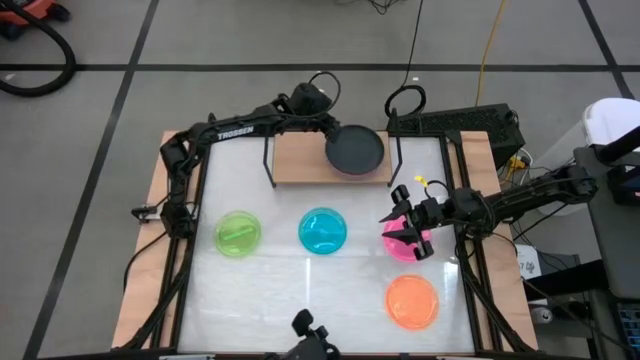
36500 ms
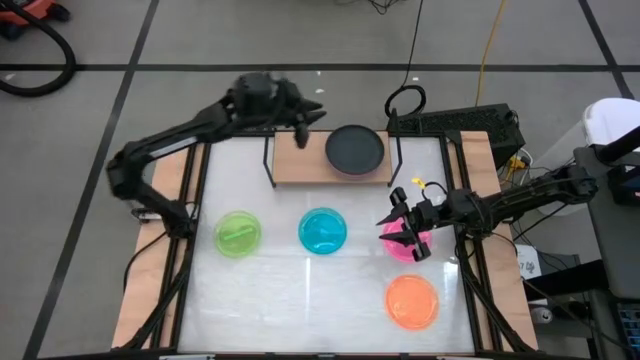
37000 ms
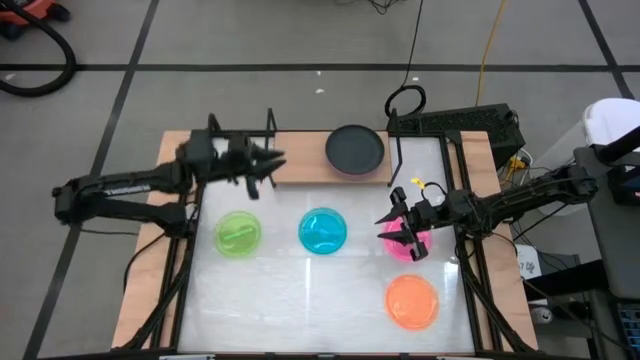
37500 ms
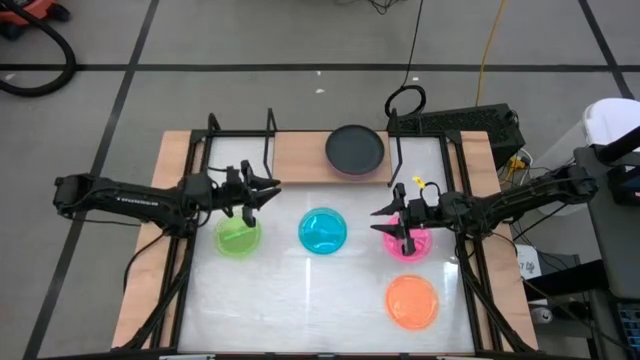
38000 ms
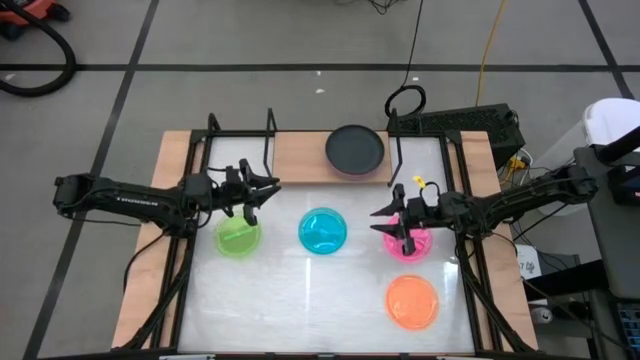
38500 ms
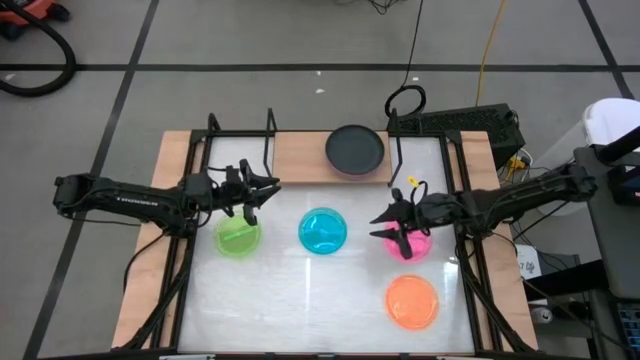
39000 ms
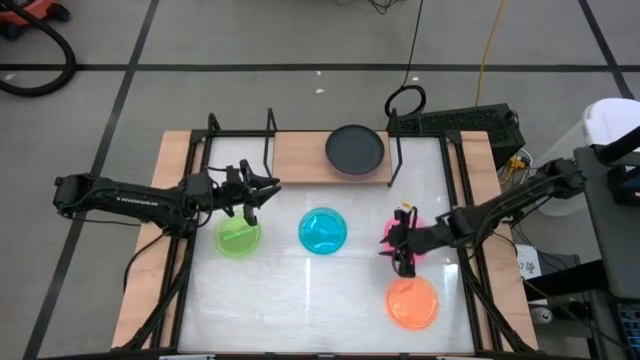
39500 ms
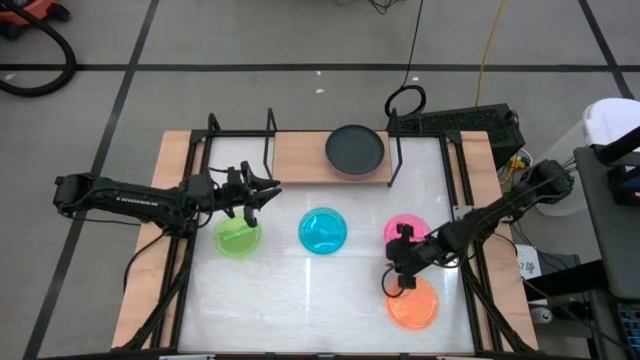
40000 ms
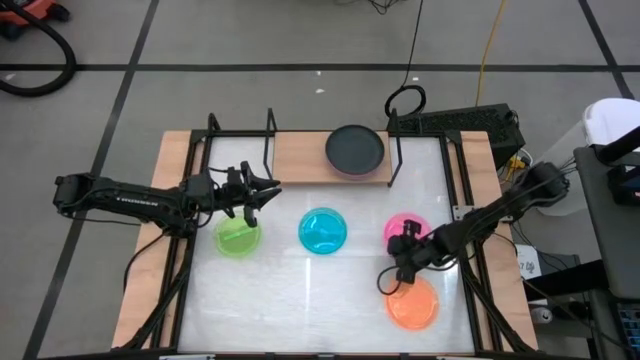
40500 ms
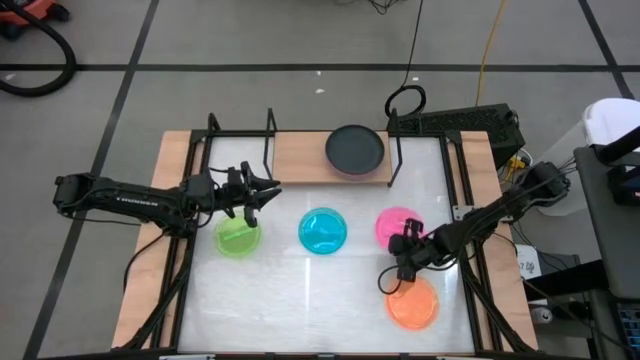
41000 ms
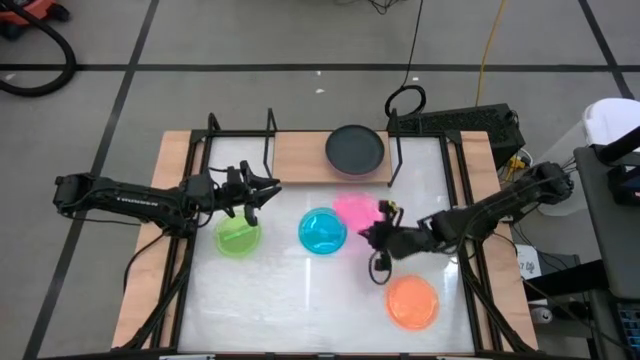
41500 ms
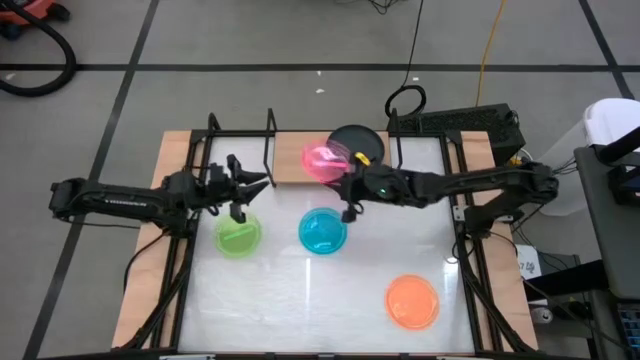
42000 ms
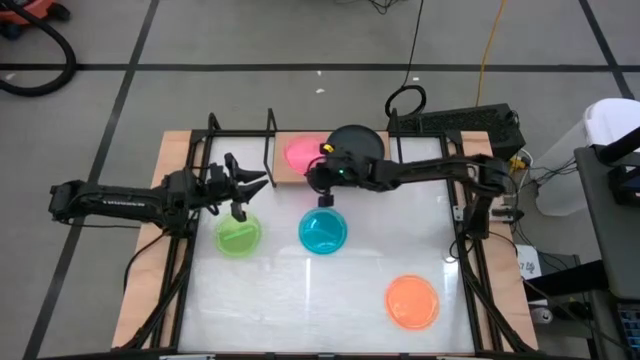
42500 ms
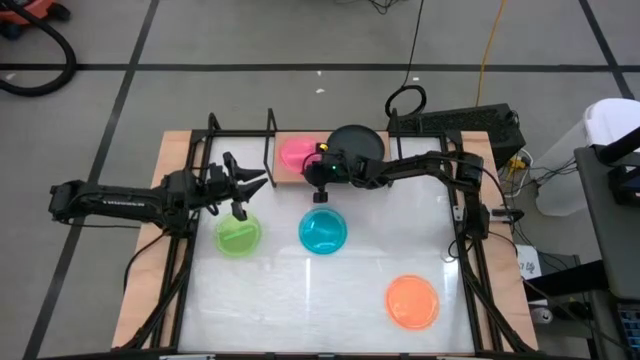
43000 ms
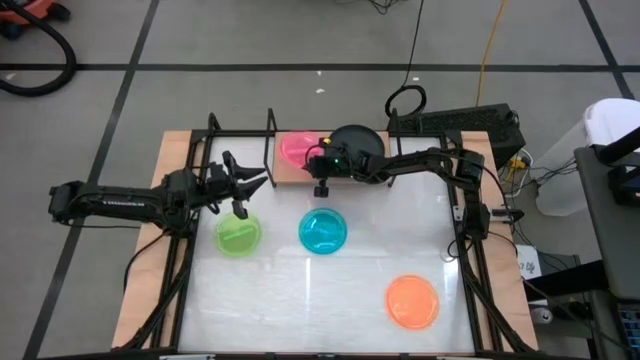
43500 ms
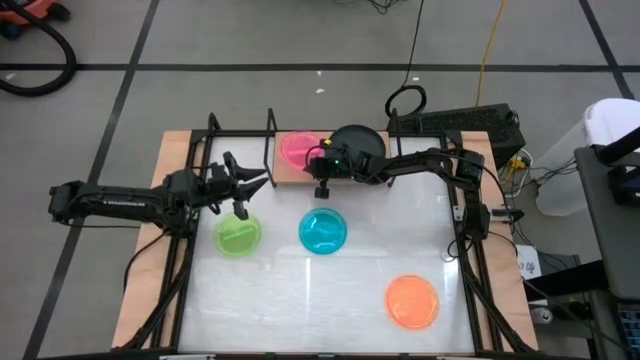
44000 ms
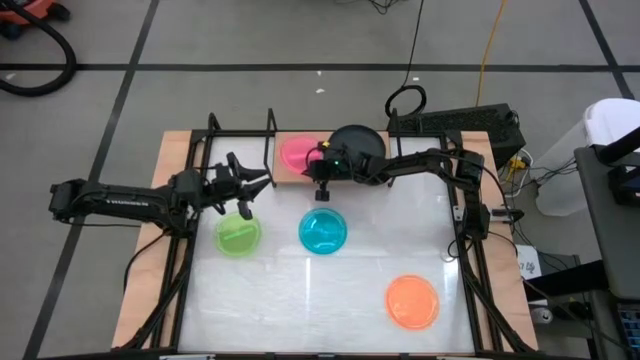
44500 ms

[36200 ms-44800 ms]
Task: Place and stack plates onto a shelf
Put the small pink plate on the shelf

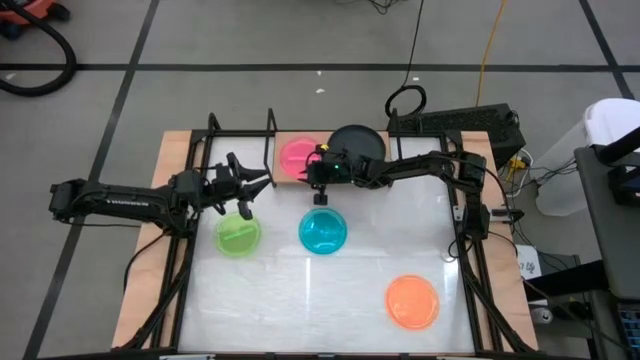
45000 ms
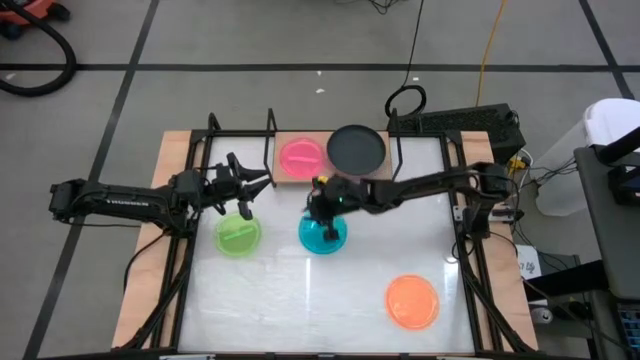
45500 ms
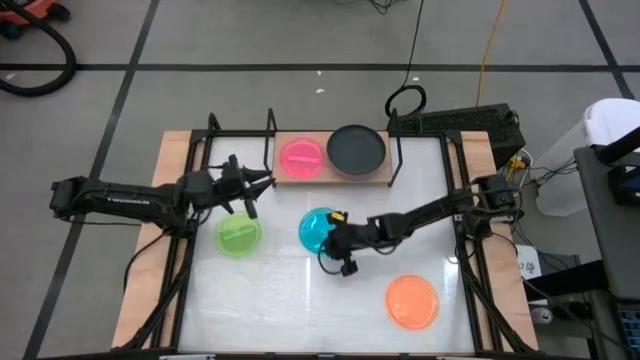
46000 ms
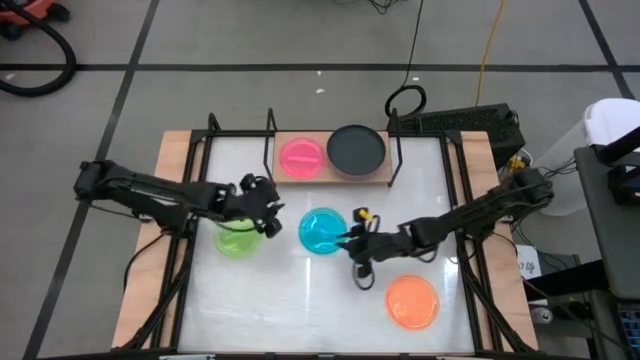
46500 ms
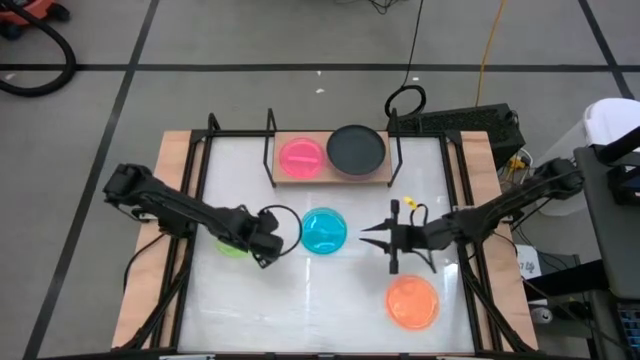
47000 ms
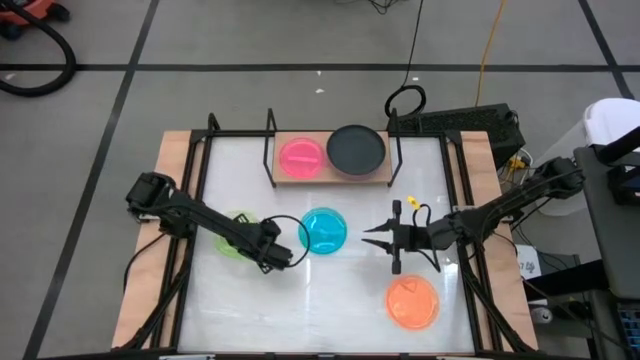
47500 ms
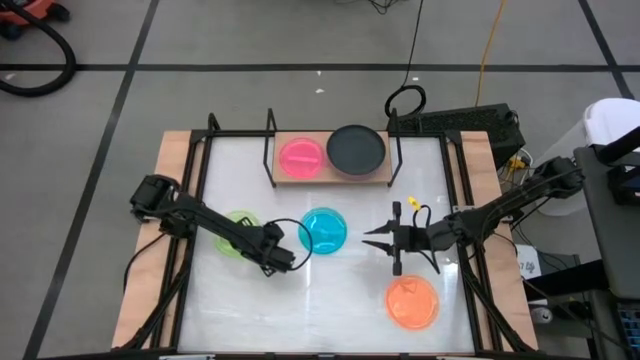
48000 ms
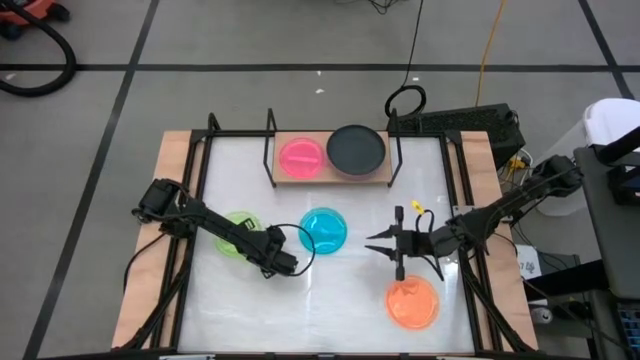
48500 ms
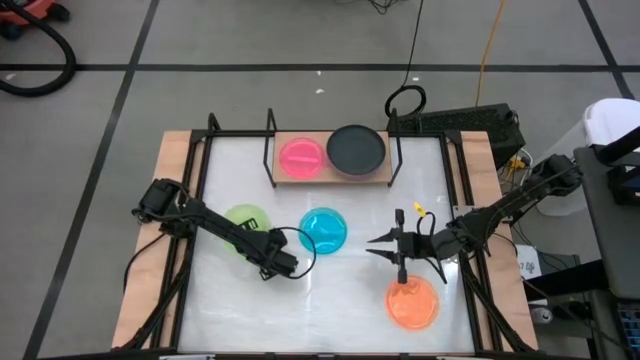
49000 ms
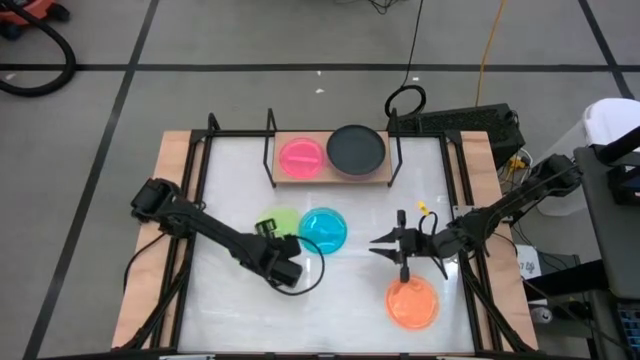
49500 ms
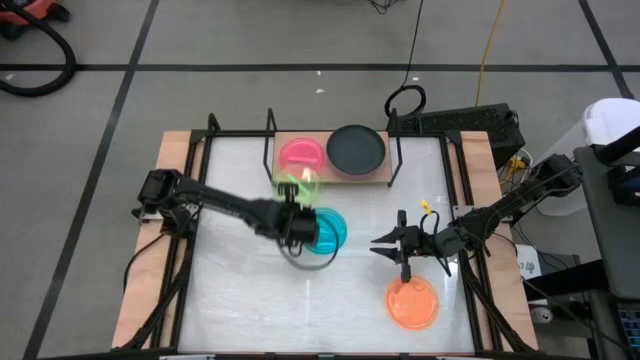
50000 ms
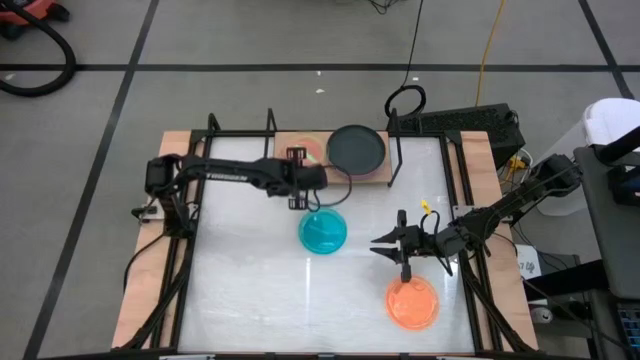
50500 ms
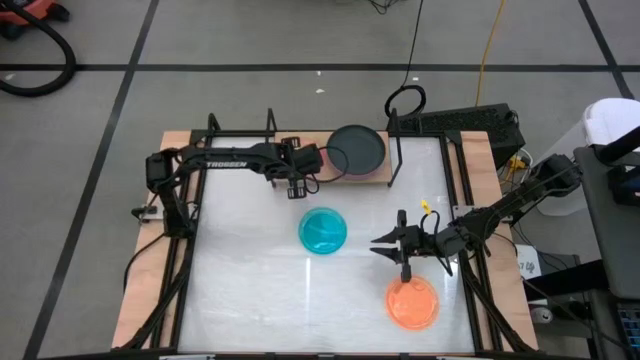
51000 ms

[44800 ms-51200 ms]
Stack the small green plate on top of the small pink plate on the shelf

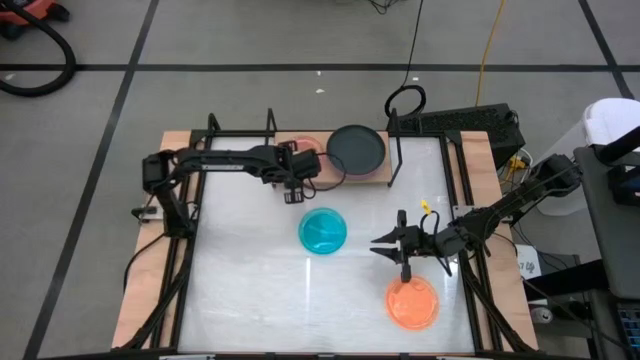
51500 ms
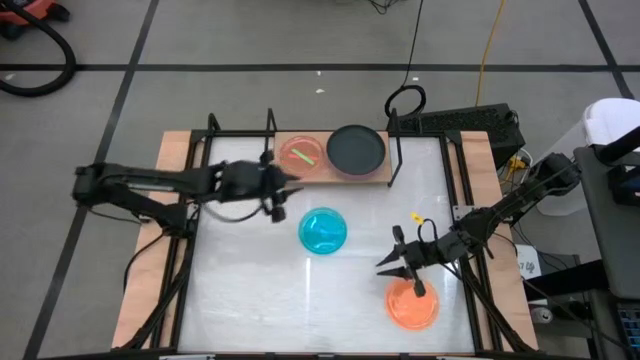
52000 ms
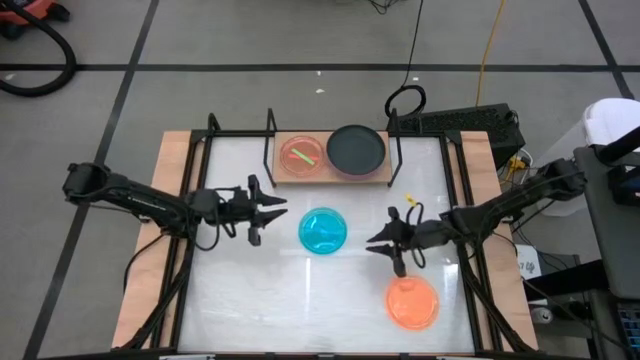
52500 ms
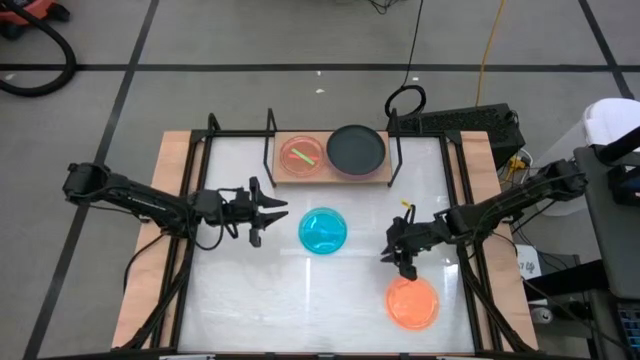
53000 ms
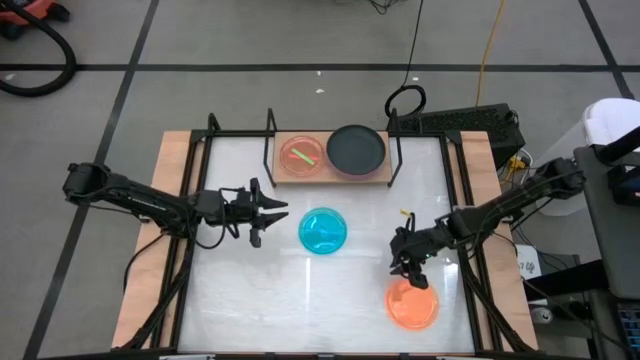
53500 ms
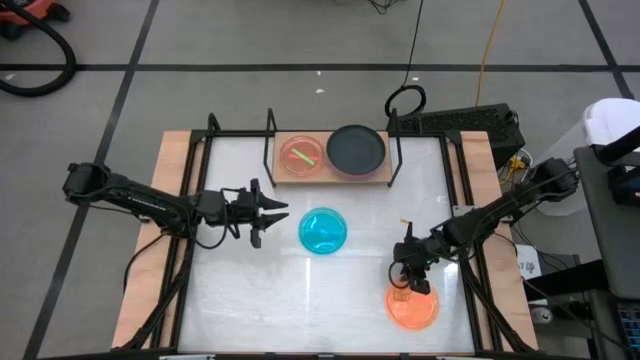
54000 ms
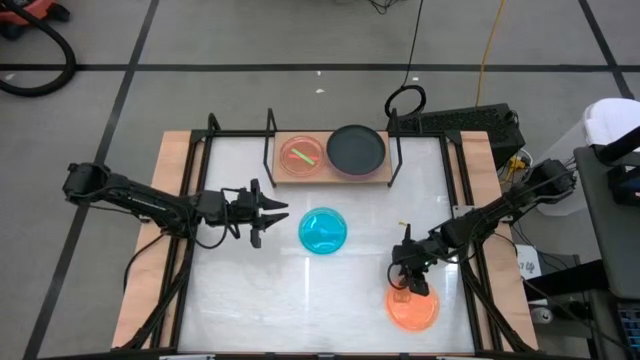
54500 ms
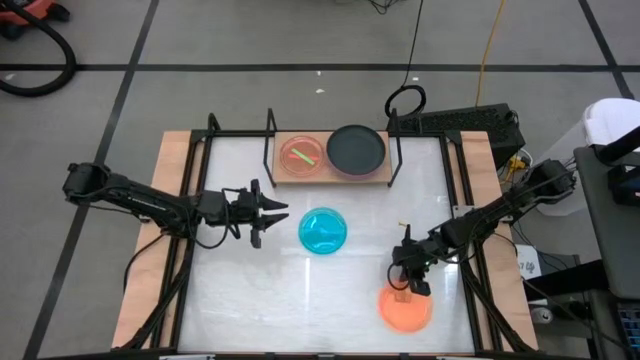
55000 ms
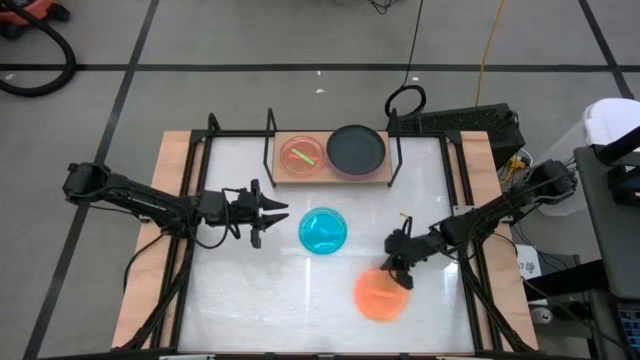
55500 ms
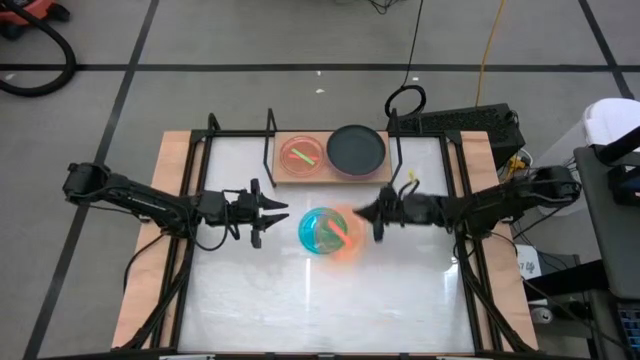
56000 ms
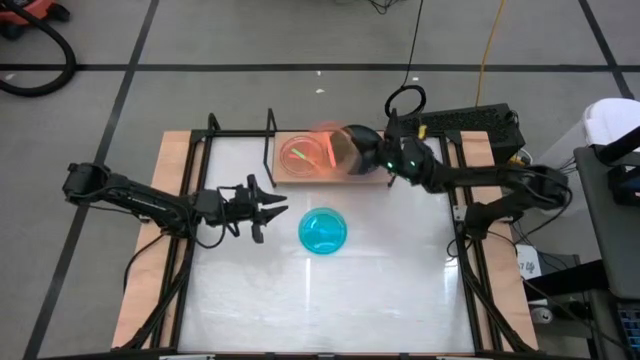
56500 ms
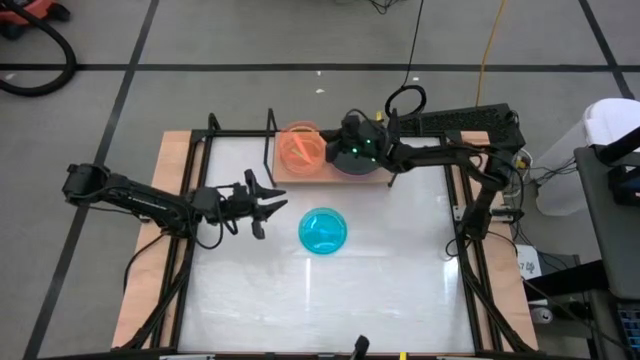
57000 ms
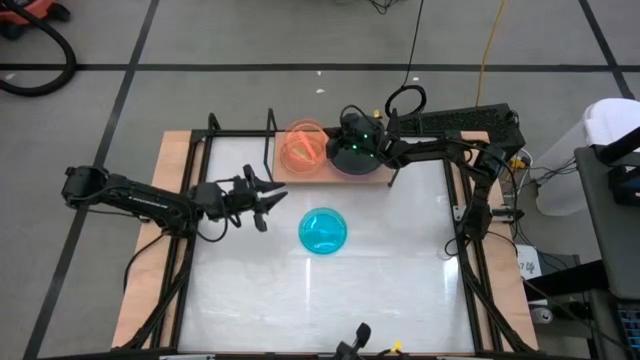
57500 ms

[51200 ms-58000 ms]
Stack the small orange plate on top of the small green plate on the shelf

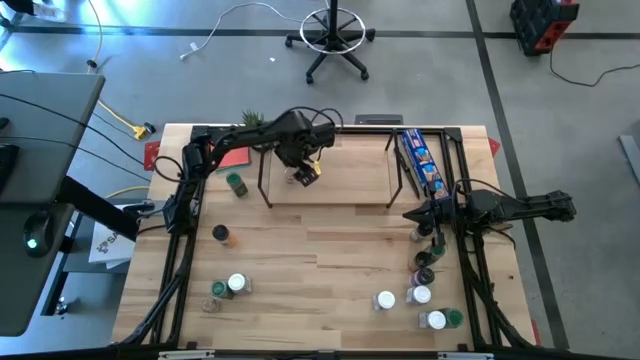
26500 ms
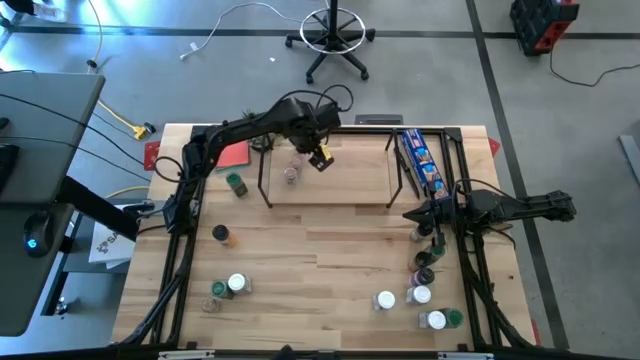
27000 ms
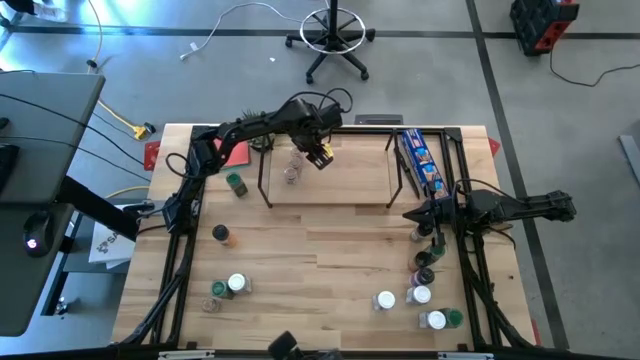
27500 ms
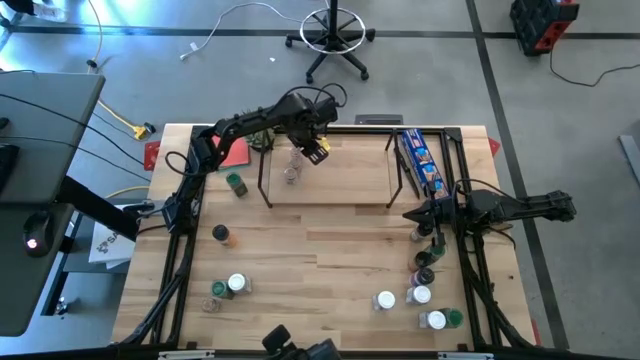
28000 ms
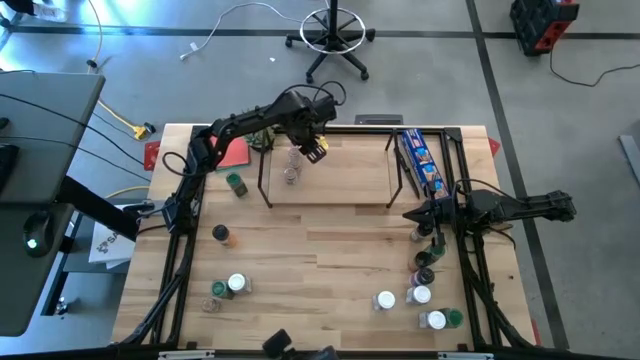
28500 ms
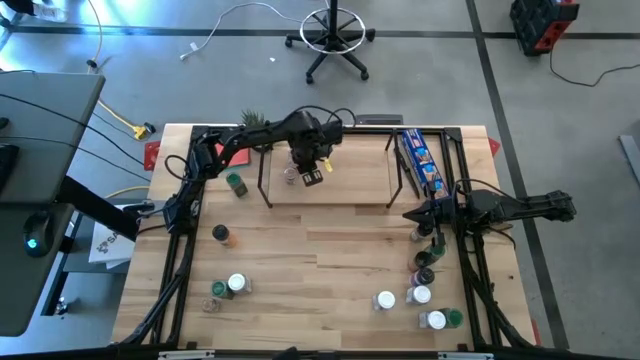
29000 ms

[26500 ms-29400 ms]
Task: Shelf spices
Adjust the brown seasoning bottles on the shelf
